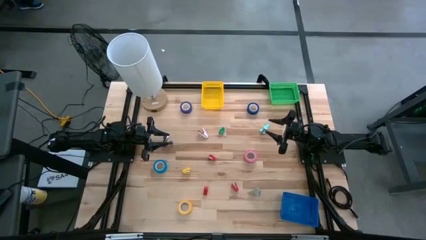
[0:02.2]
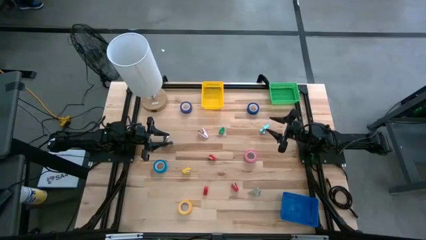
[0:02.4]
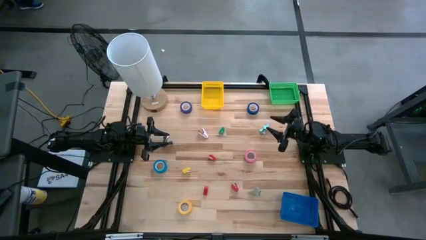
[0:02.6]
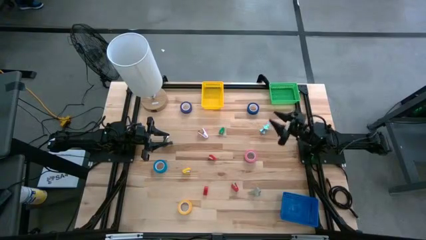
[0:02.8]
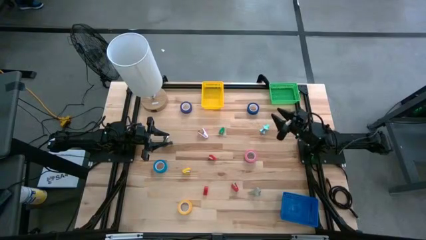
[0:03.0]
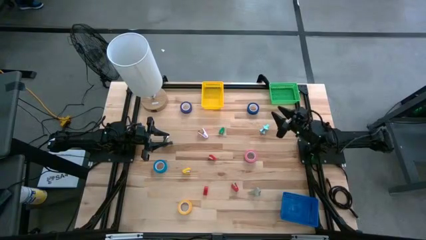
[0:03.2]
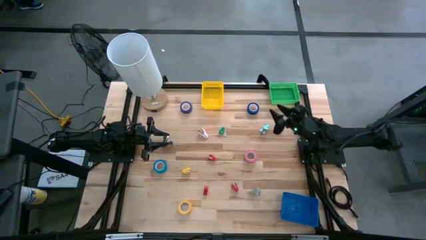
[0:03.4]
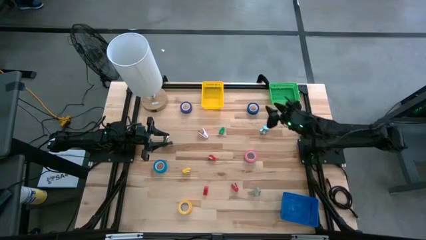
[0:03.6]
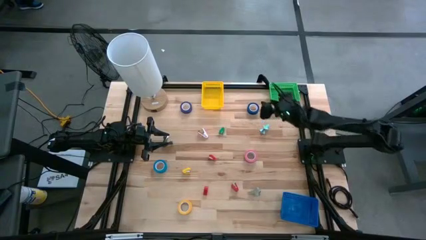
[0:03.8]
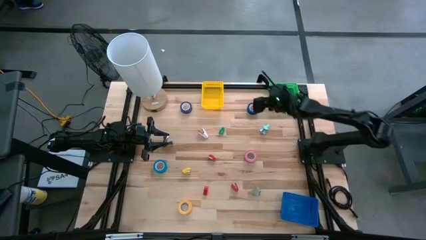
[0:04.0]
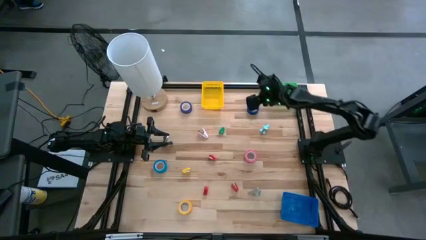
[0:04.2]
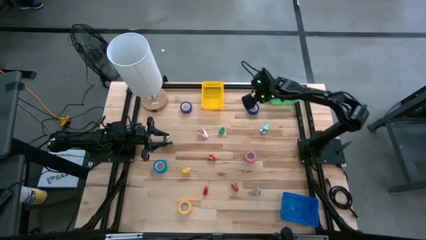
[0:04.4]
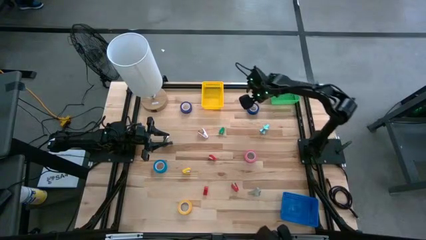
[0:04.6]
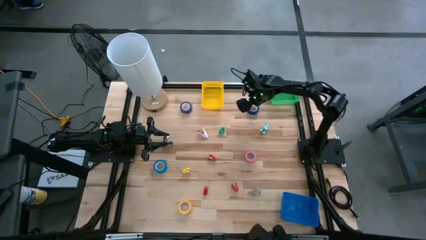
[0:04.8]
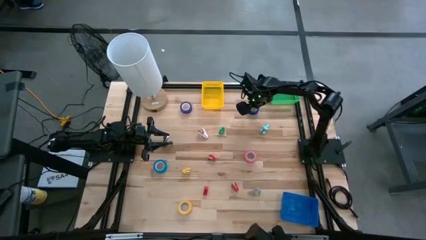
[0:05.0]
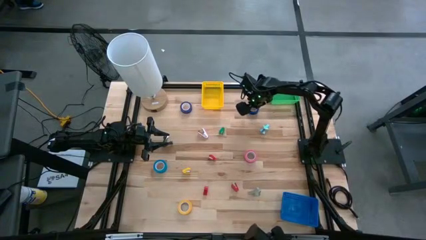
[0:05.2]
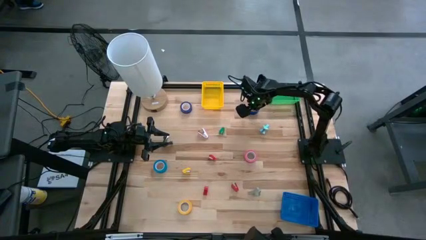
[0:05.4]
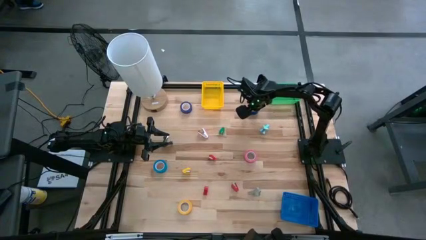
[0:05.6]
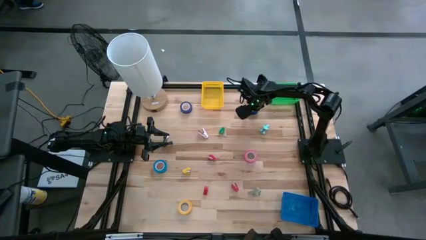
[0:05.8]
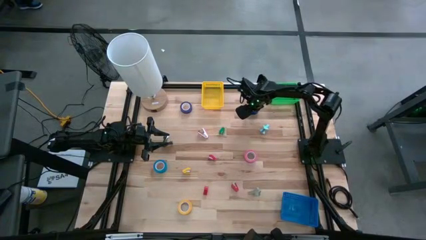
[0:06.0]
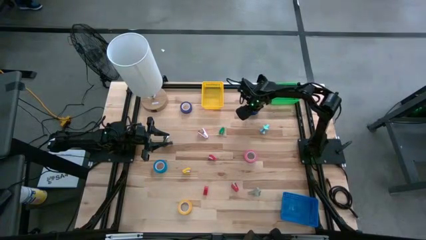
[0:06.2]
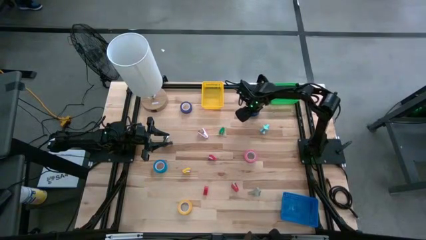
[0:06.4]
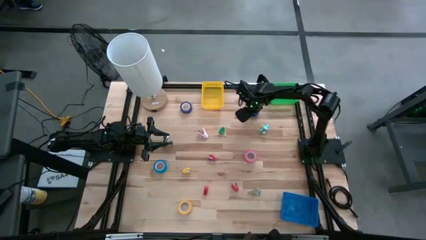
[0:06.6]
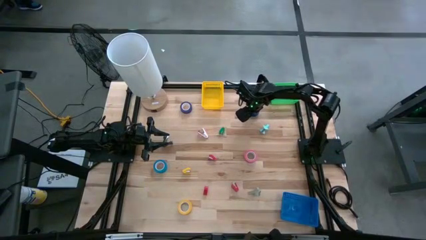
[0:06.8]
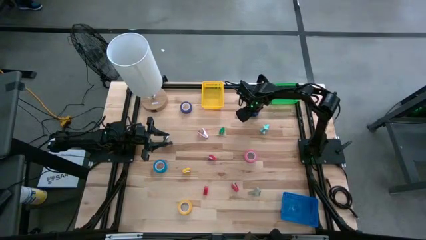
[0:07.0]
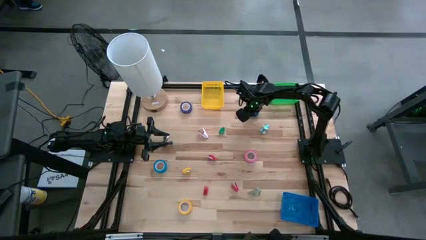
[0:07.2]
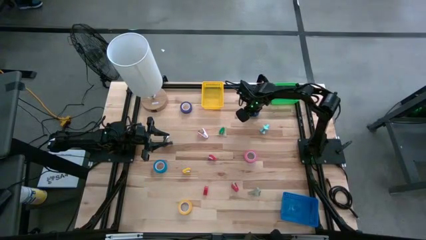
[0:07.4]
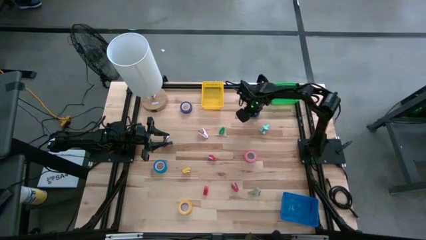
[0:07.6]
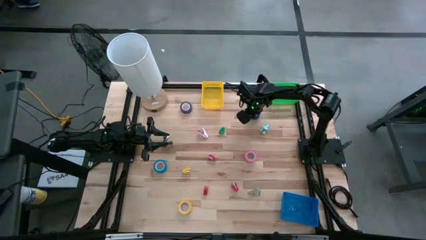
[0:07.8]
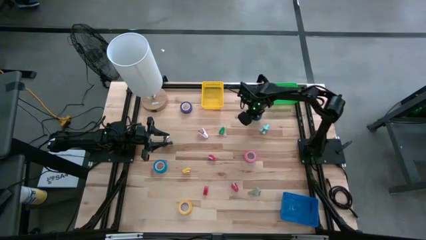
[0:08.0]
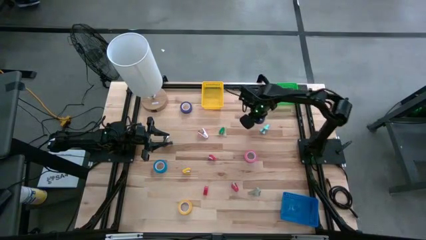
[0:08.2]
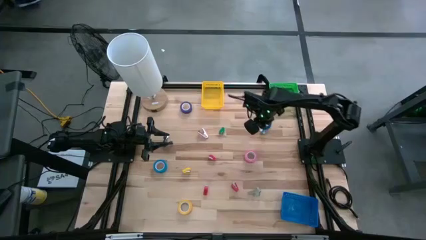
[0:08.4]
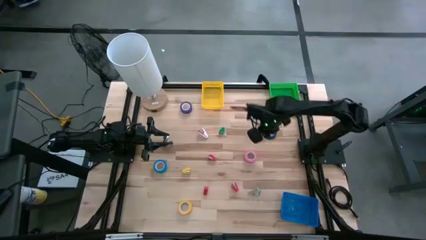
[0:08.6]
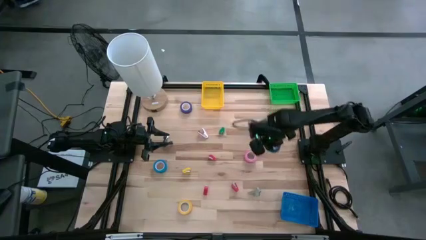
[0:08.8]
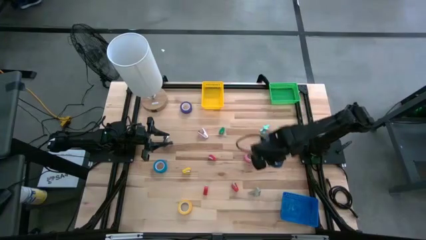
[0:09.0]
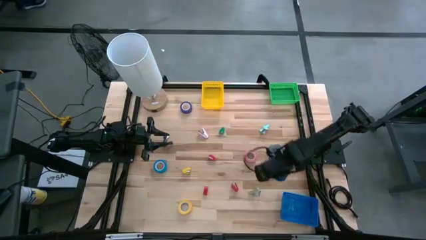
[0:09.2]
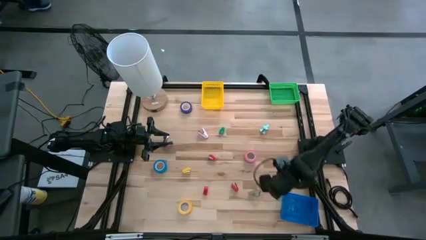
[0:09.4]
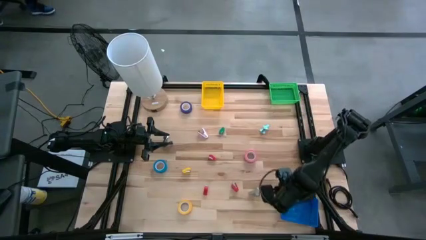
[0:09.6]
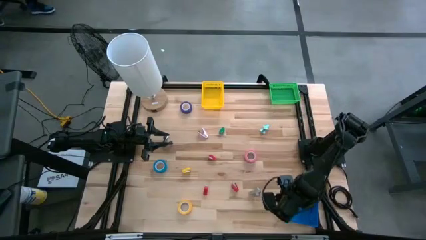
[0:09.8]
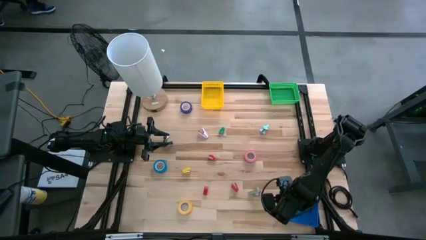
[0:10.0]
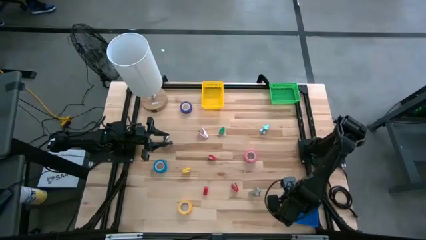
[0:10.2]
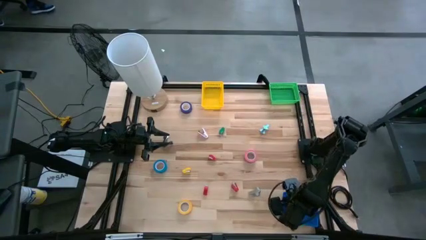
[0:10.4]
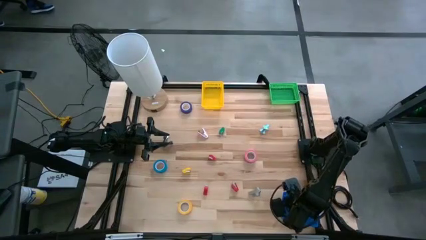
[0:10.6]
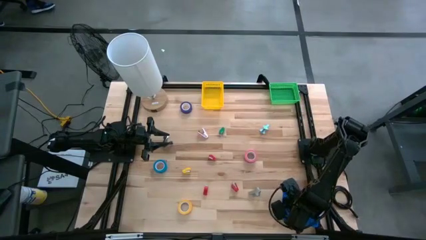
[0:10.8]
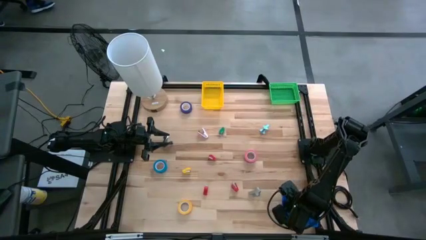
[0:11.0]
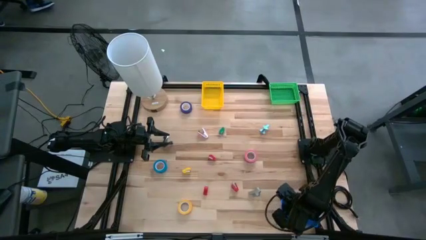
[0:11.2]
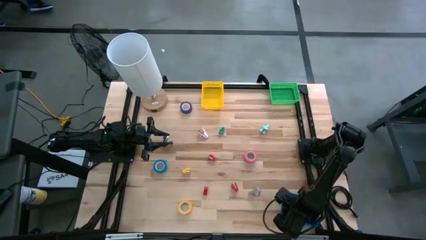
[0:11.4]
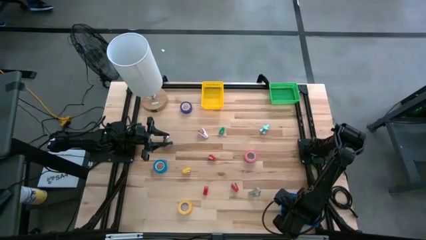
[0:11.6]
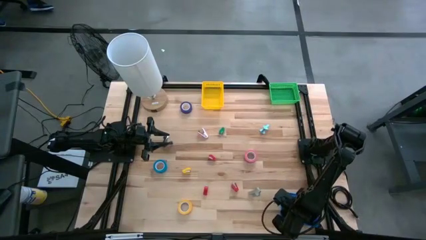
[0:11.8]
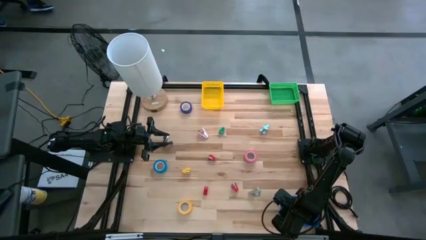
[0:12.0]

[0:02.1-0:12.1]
Task: Pick and place Stapler, Stapler remover, tape
Put the right blue tape into the blue bin

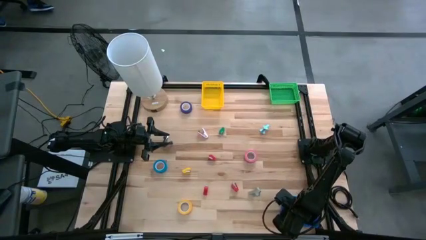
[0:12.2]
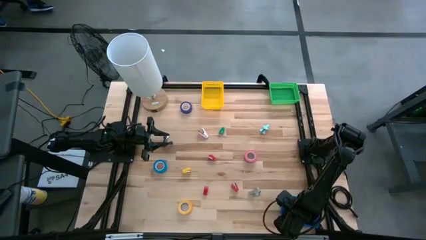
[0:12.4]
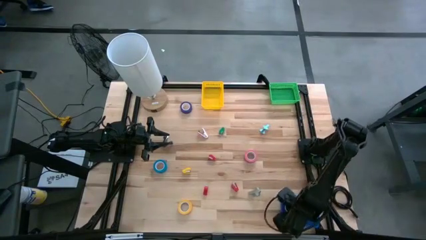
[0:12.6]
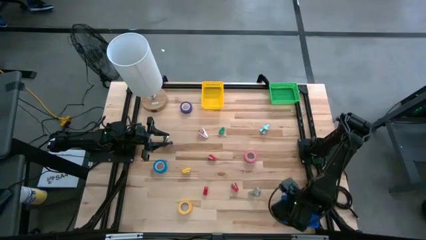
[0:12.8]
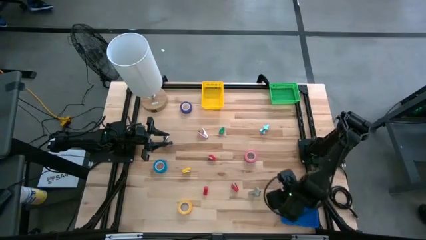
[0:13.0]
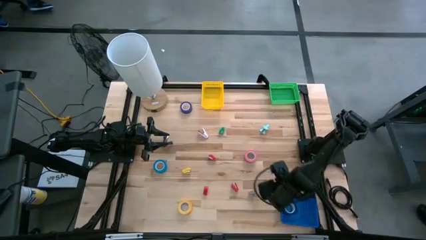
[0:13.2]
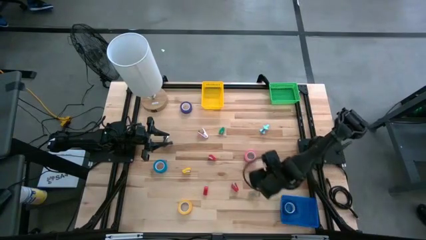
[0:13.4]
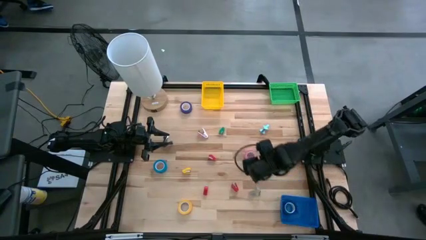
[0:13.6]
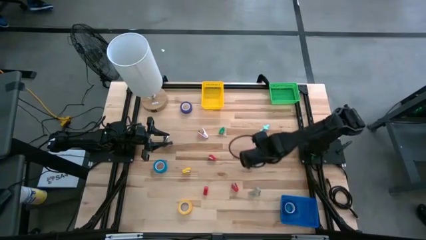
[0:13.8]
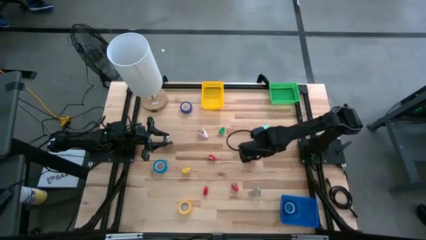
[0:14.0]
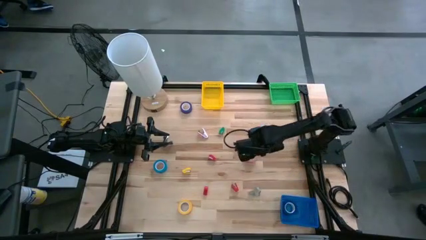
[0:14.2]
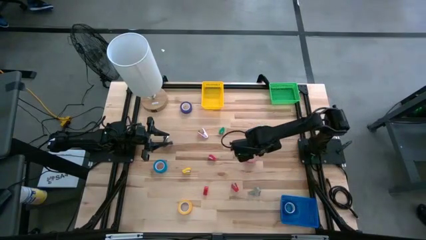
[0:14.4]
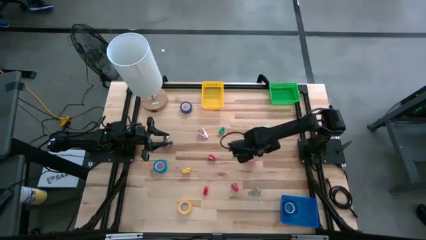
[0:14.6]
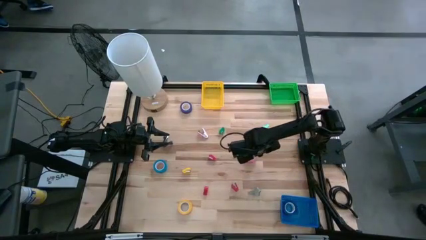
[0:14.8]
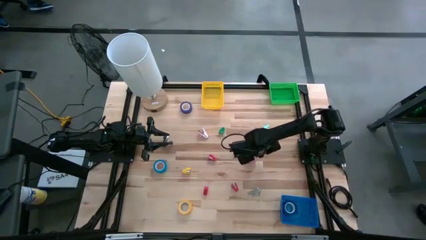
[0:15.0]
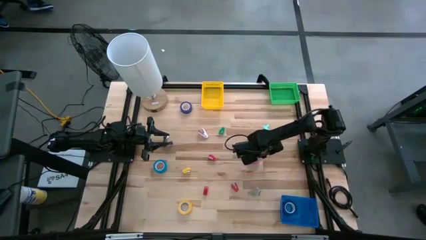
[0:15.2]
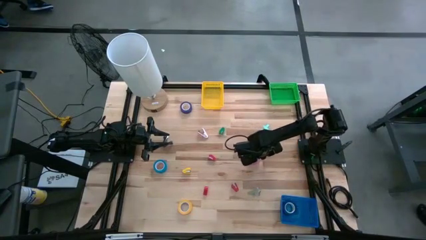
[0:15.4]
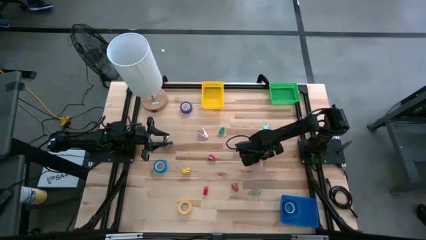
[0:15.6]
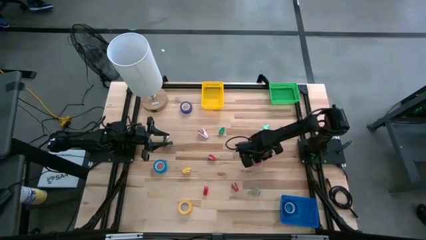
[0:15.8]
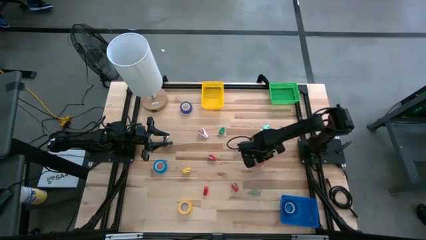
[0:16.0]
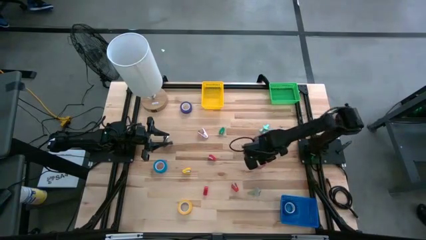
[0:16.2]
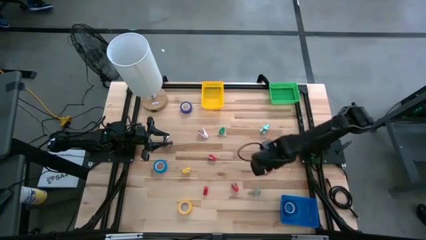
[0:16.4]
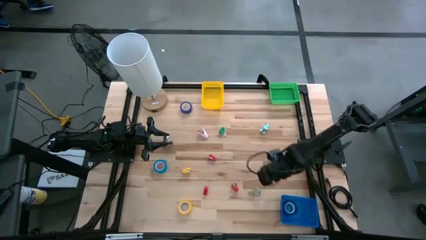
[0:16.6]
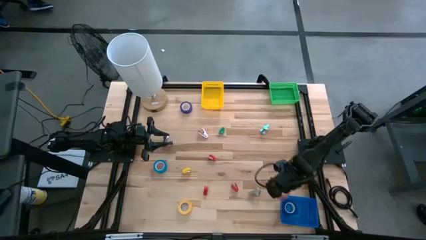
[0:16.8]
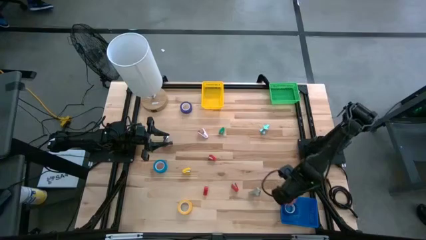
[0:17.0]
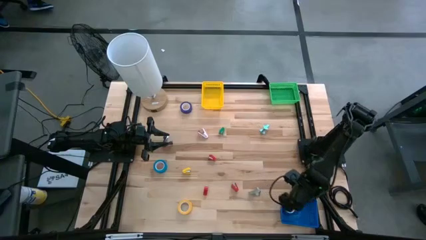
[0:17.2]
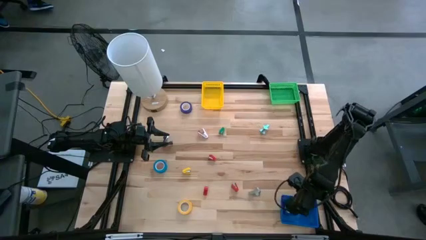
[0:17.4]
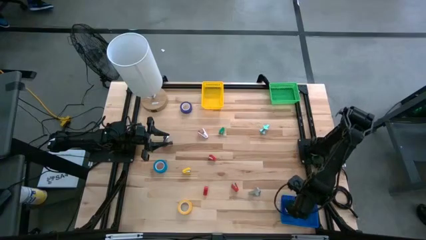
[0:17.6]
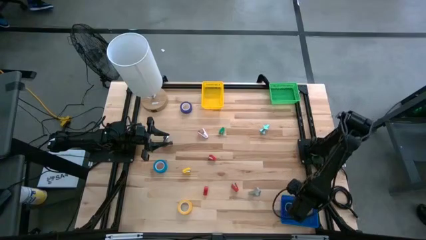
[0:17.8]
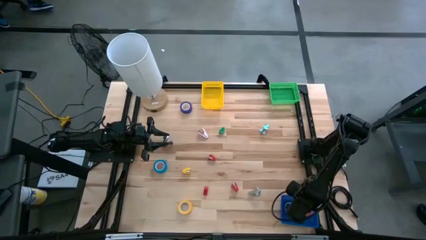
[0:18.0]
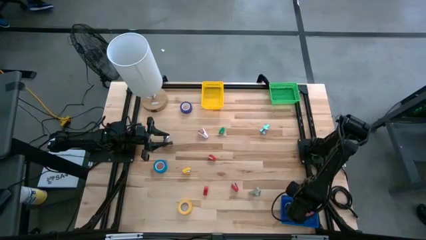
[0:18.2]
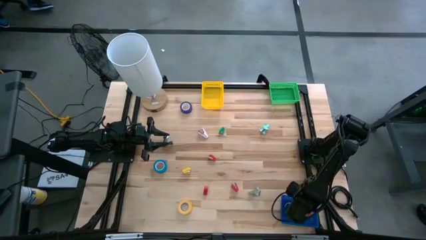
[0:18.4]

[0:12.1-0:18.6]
Put the pink tape into the blue bin
